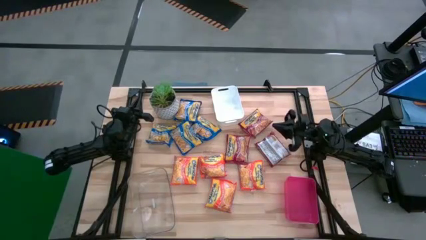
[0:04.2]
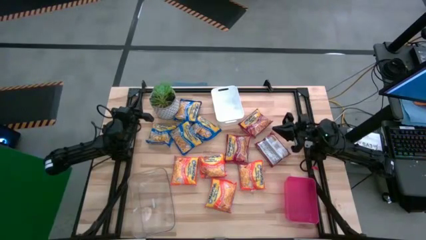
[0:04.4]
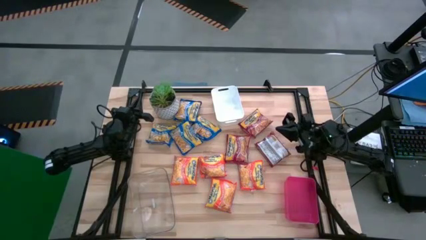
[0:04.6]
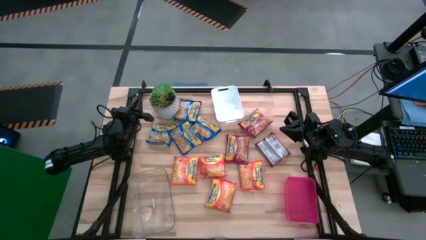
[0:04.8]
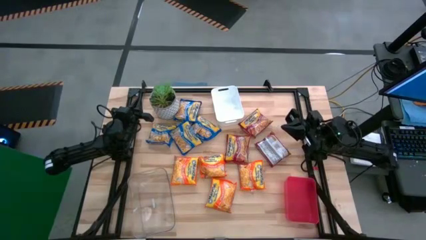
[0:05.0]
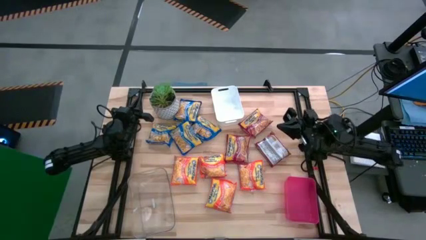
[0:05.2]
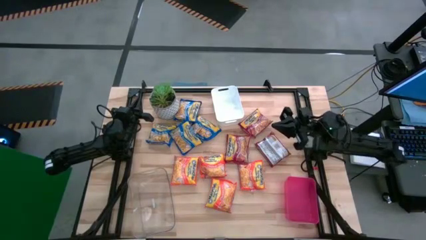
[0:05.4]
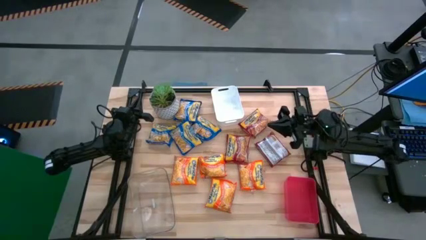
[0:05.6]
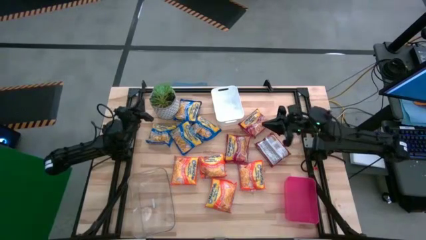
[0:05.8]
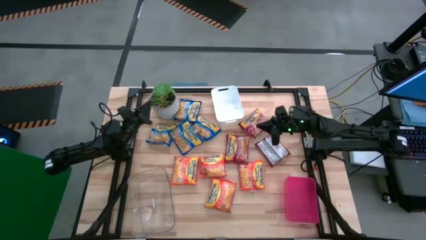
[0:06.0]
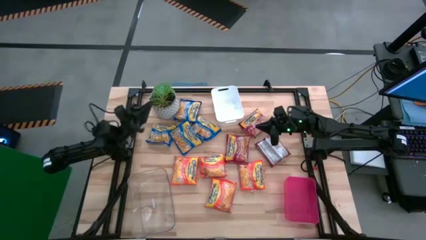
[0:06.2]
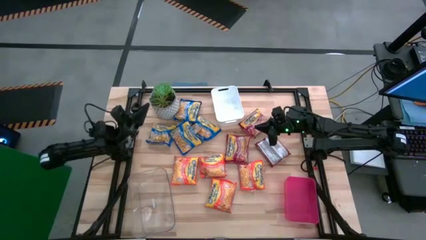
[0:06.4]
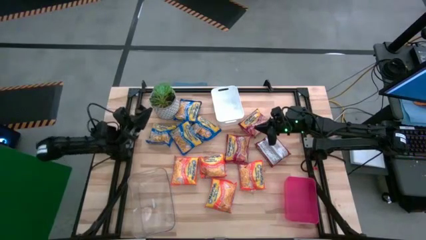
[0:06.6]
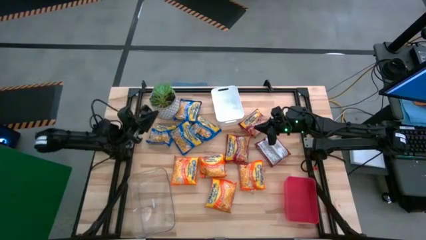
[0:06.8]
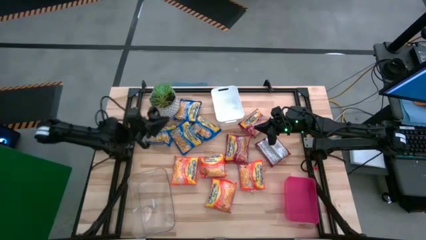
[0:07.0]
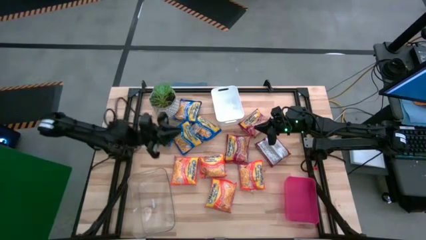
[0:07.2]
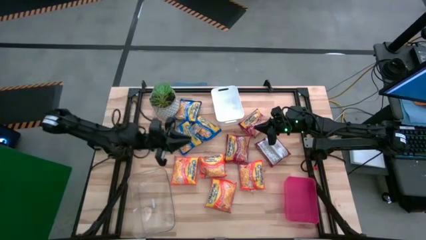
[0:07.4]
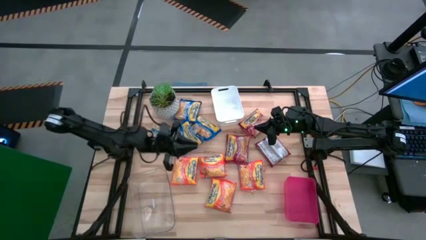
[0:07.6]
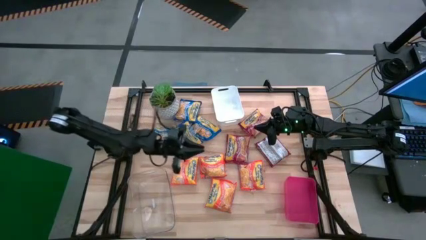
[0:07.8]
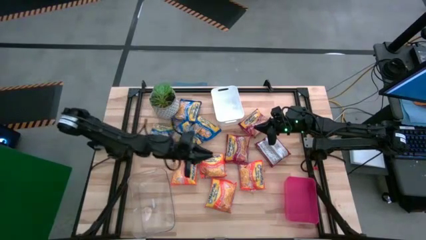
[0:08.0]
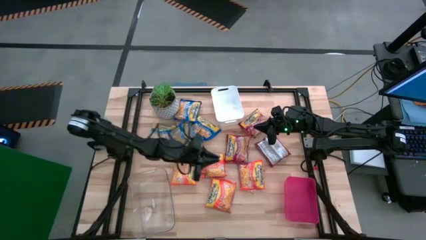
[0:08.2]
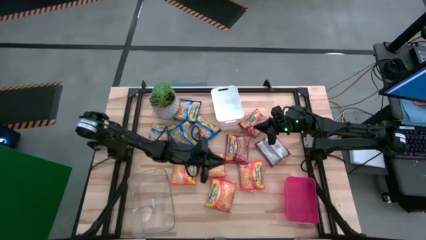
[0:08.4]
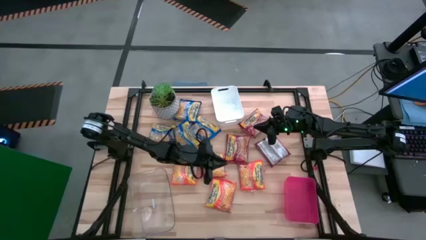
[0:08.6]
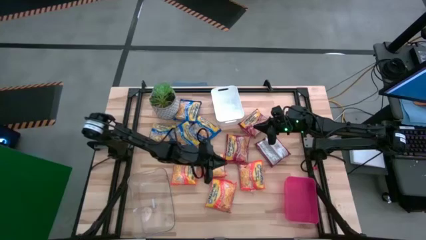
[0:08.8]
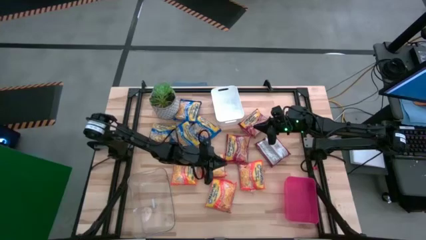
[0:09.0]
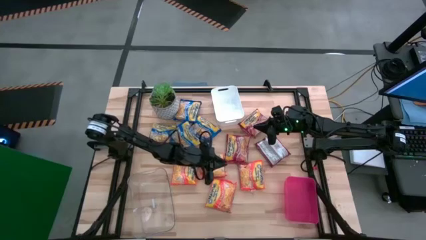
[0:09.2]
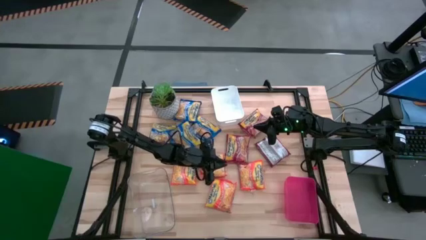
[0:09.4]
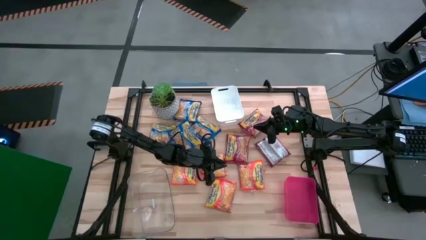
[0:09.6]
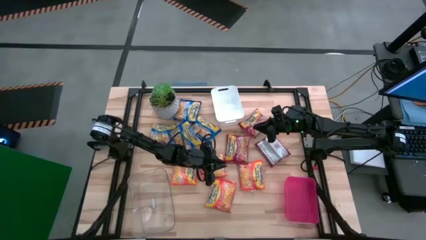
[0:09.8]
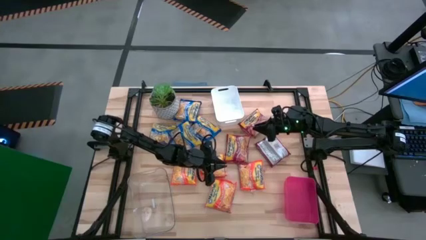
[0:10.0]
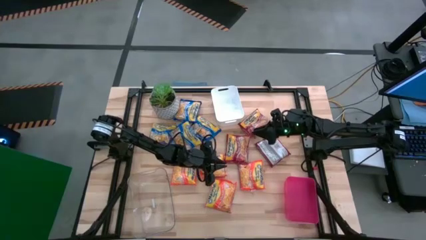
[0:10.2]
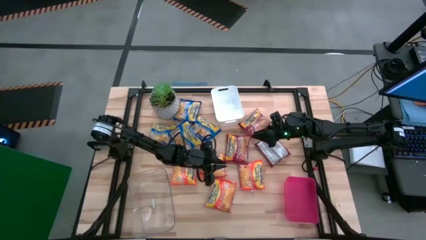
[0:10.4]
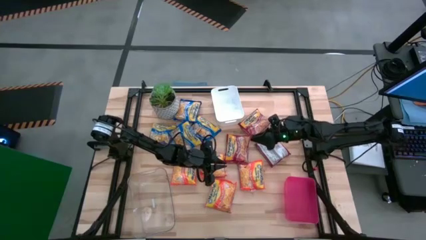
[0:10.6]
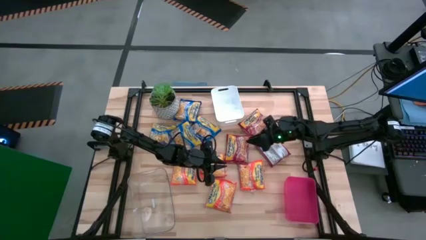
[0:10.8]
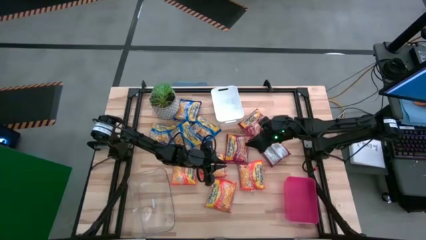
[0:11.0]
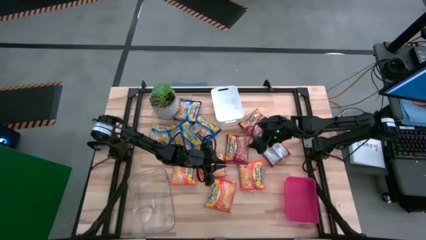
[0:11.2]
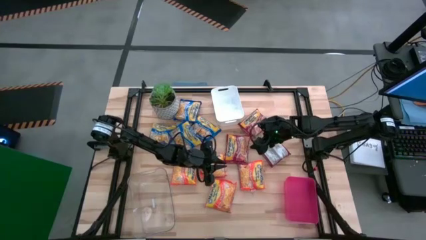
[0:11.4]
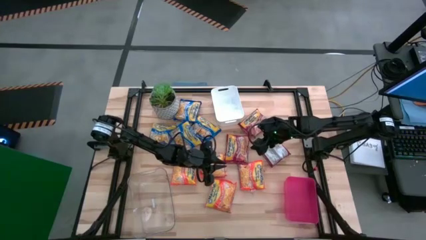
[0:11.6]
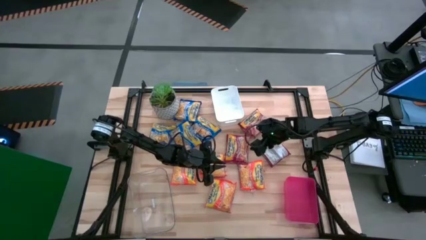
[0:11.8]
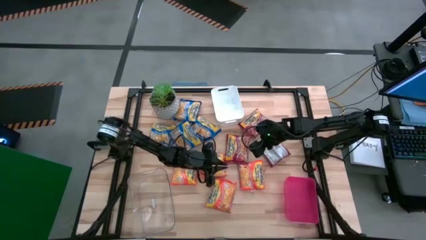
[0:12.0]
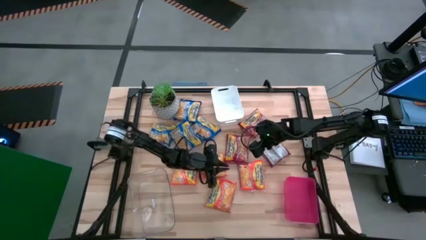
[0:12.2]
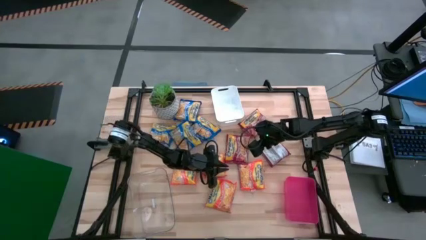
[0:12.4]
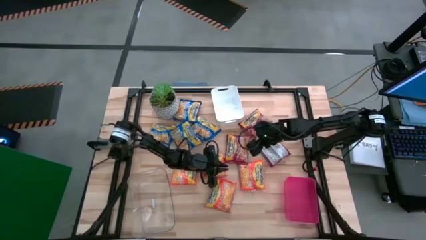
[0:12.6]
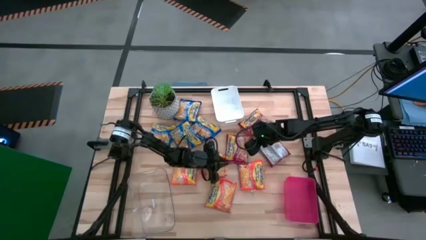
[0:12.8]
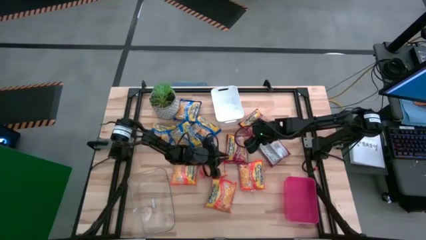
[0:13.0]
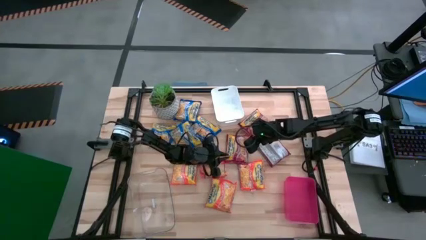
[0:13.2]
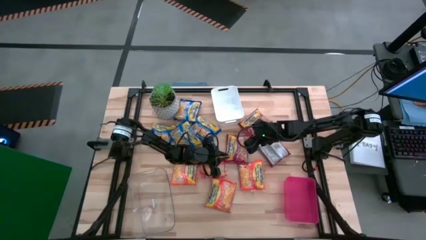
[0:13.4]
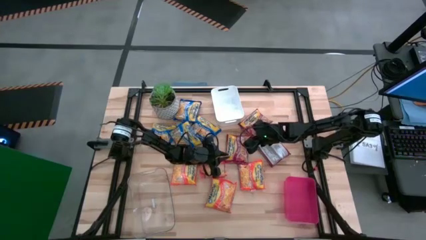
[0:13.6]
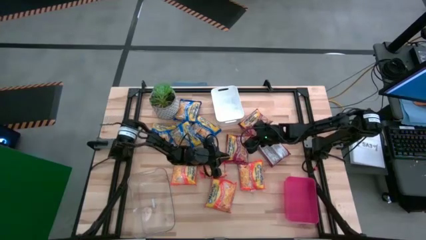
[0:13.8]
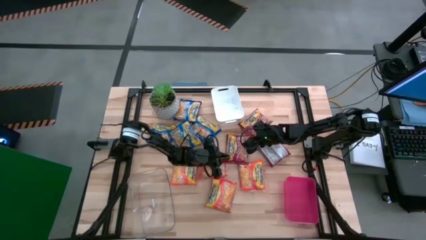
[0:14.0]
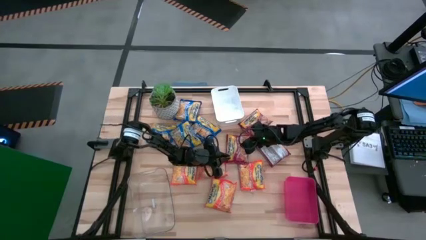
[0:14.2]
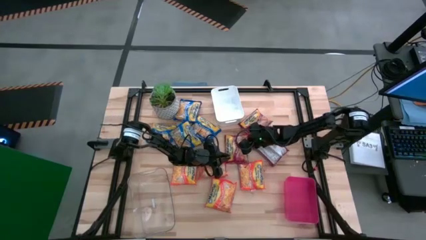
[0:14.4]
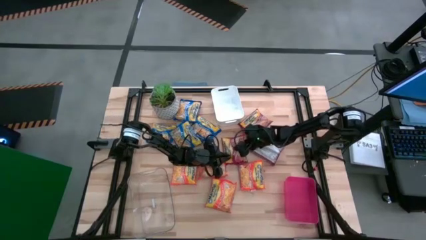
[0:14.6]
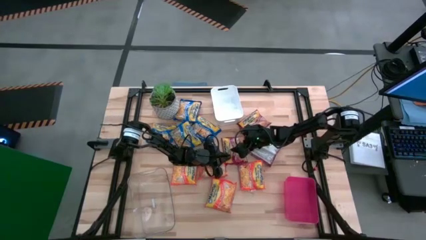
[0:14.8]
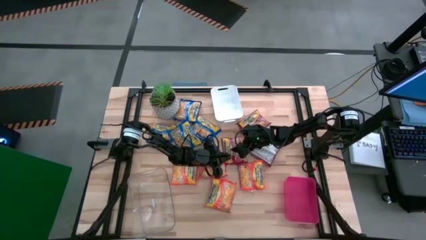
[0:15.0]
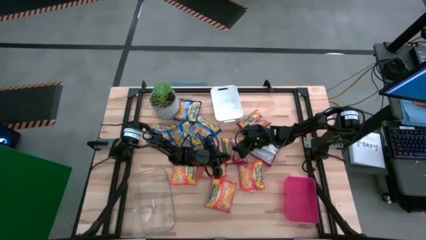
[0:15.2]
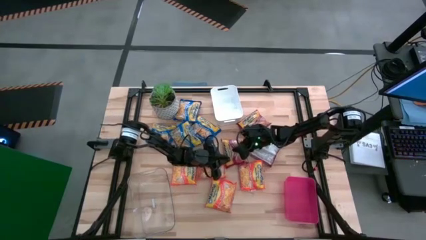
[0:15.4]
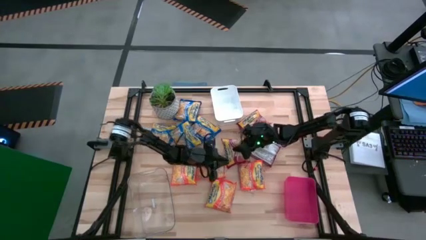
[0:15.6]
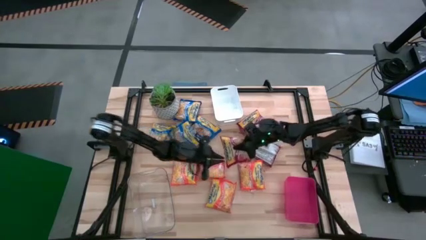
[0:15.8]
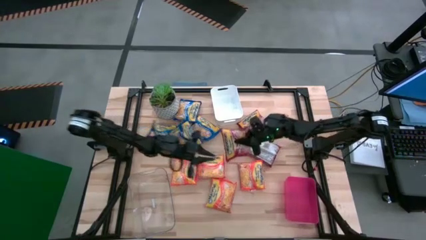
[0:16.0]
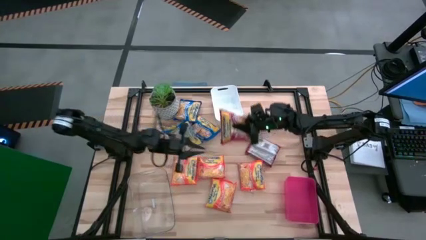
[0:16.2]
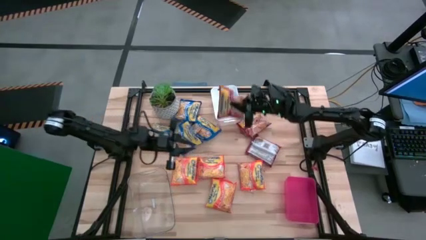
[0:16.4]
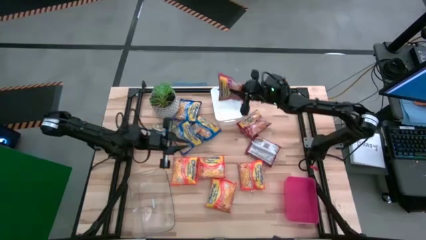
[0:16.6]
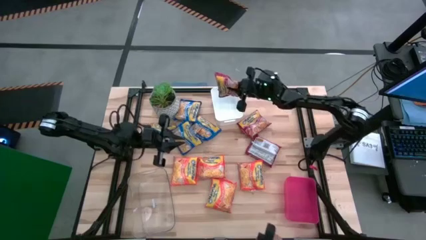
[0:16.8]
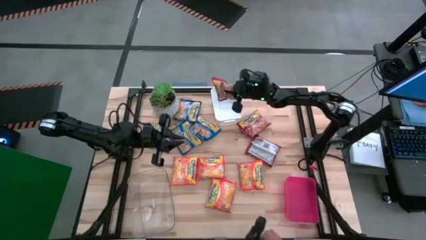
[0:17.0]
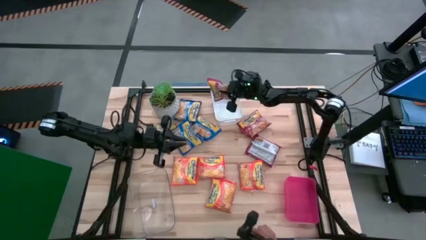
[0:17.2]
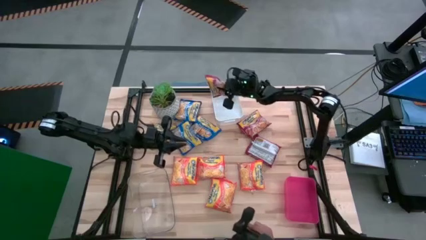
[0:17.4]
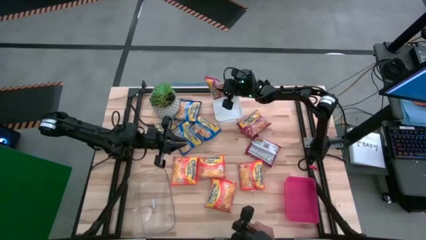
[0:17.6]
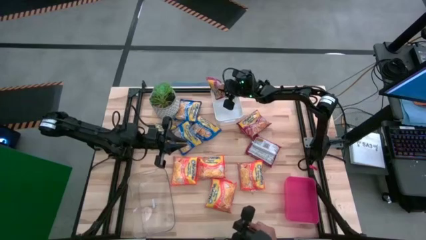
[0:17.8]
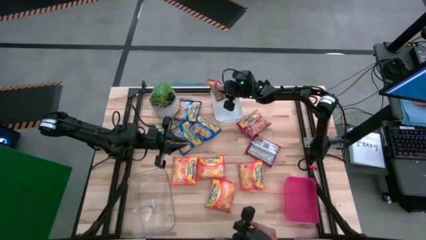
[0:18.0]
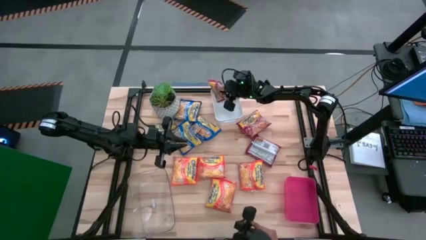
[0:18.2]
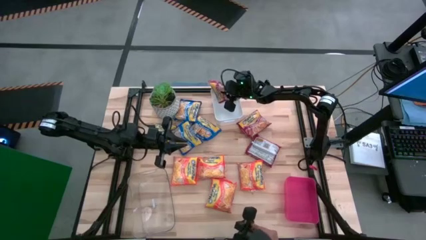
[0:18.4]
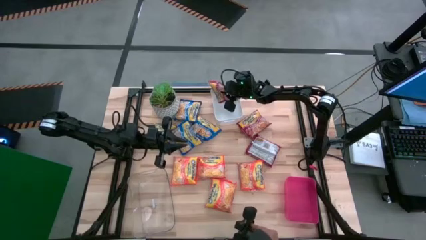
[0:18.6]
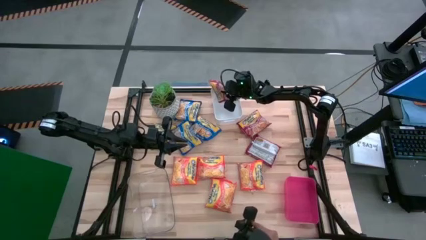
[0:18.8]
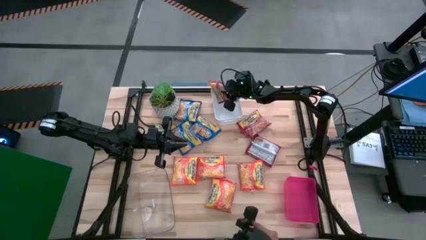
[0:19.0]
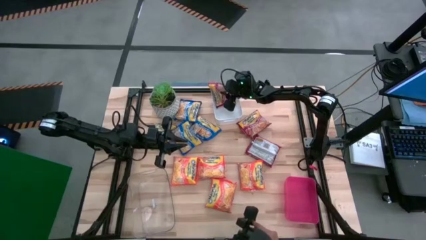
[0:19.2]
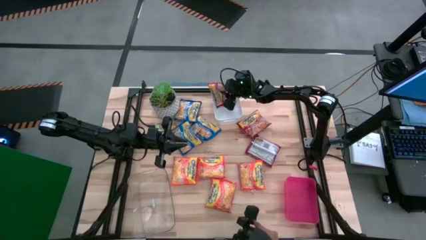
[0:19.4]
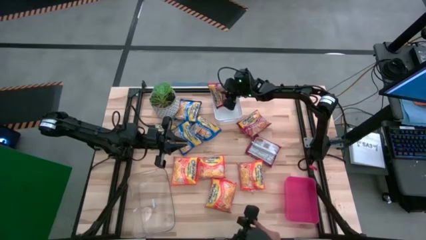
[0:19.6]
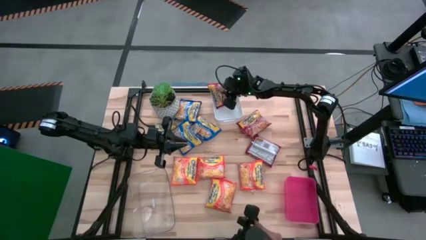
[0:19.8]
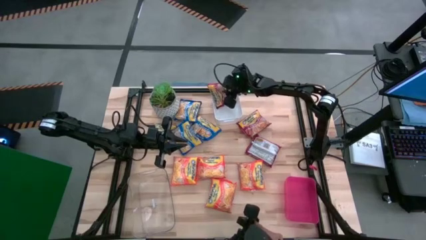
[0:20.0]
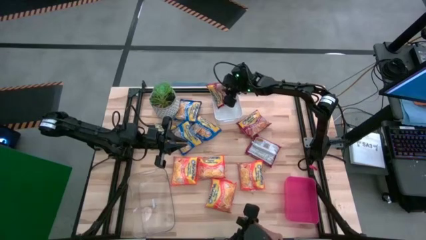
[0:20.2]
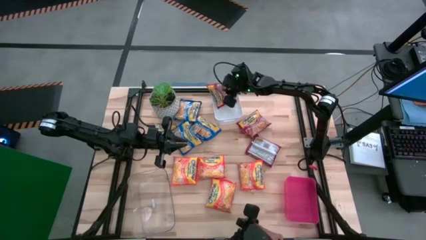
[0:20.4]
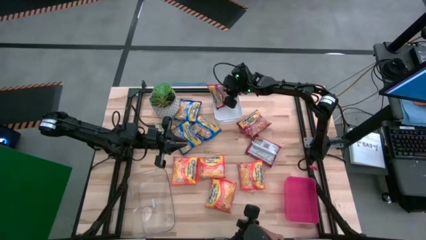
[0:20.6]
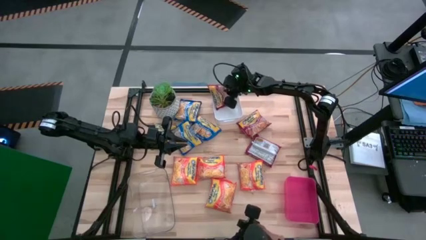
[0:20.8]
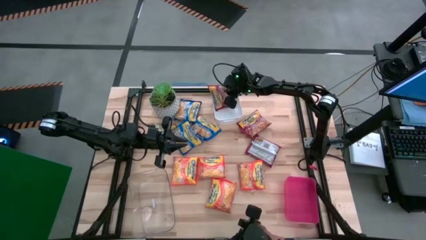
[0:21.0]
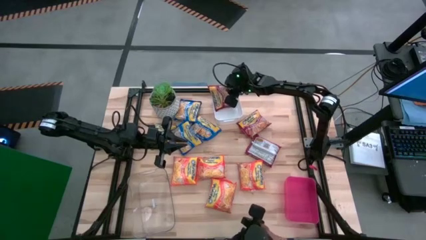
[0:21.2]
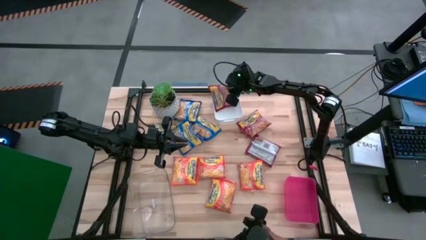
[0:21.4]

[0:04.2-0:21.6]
Task: Sort Maruchan noodles
Put the left red noodle pack into the white bin
